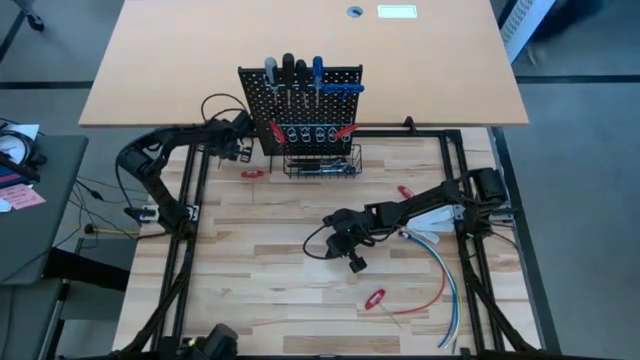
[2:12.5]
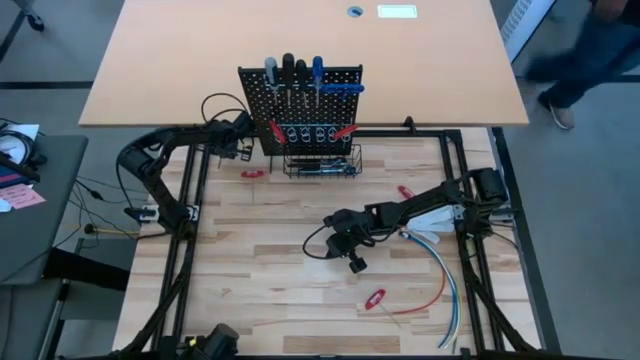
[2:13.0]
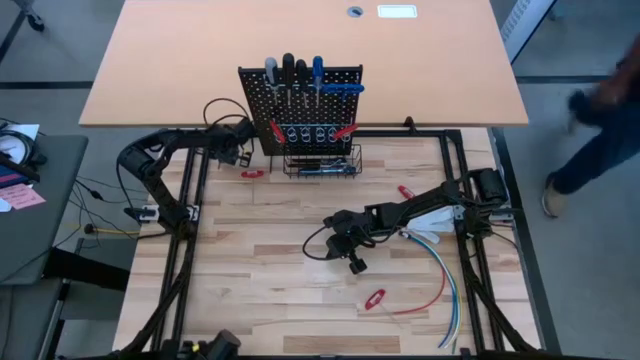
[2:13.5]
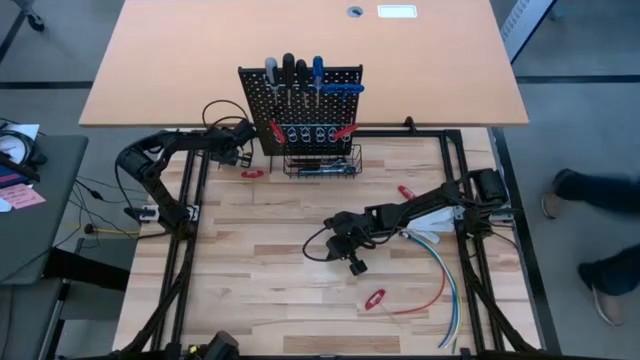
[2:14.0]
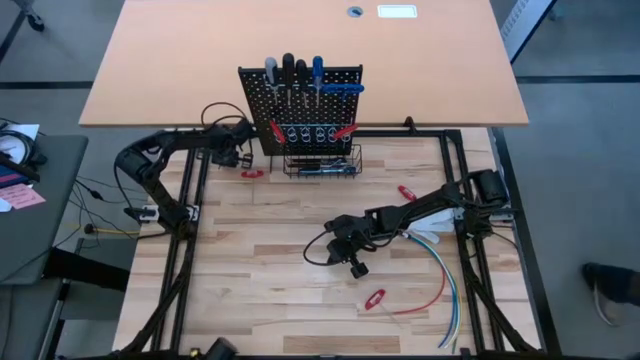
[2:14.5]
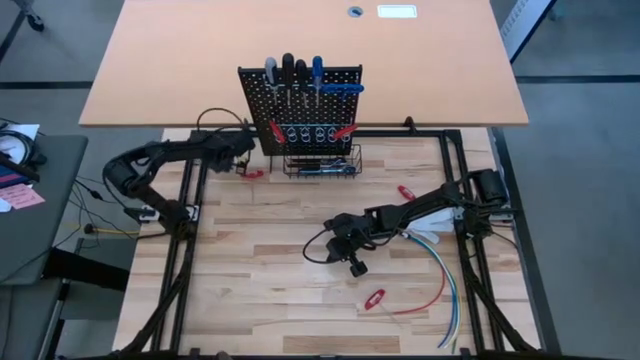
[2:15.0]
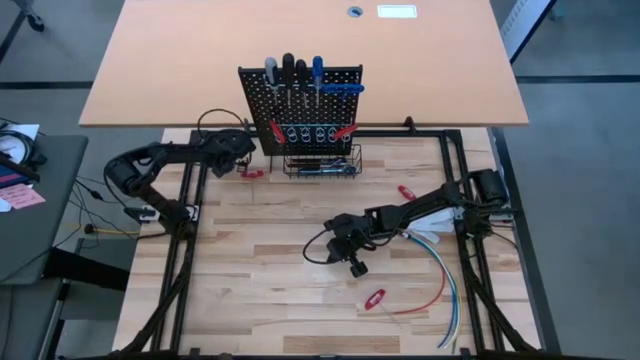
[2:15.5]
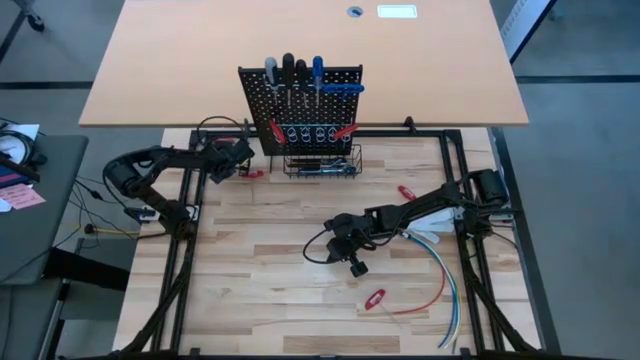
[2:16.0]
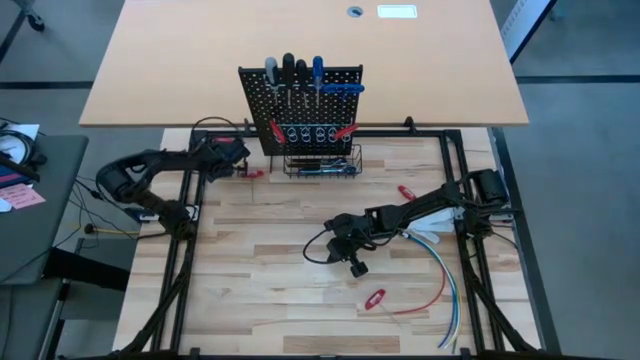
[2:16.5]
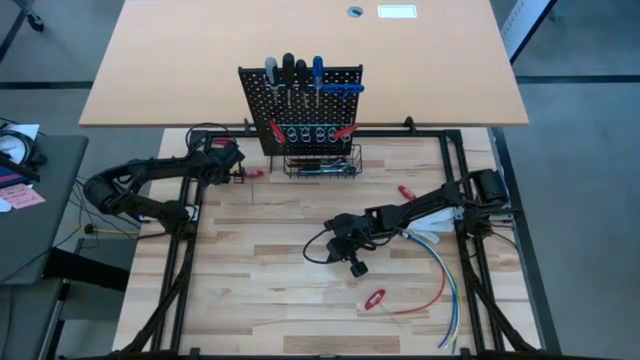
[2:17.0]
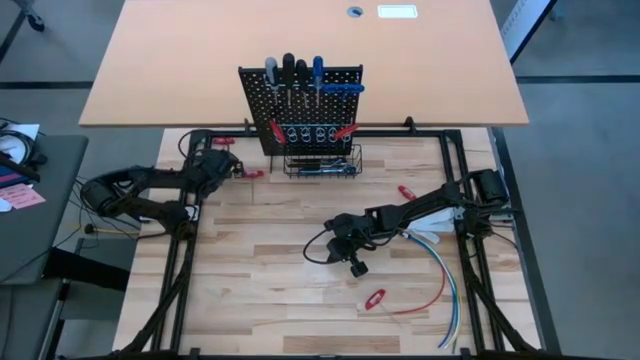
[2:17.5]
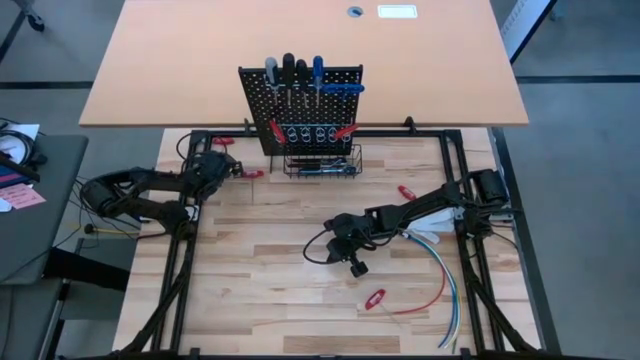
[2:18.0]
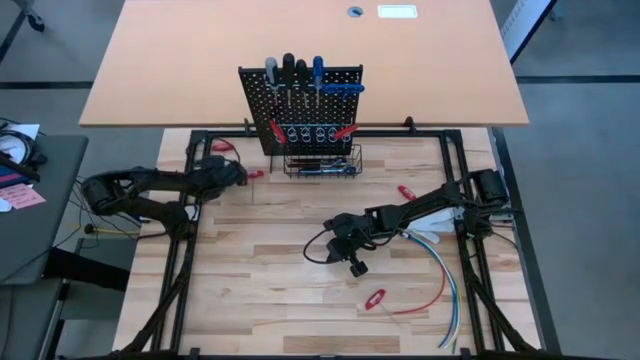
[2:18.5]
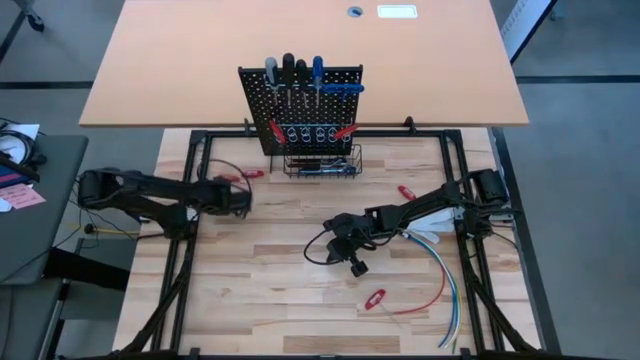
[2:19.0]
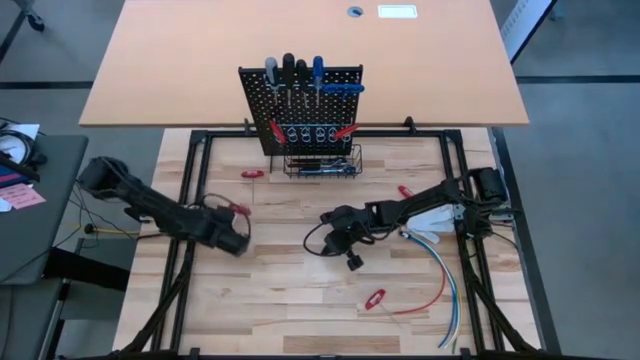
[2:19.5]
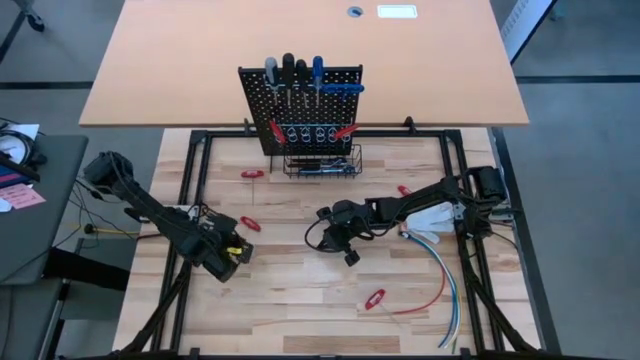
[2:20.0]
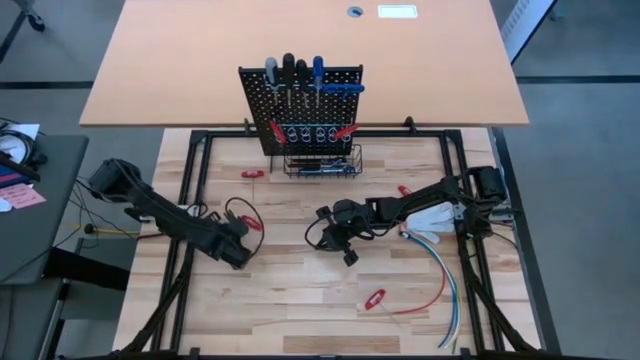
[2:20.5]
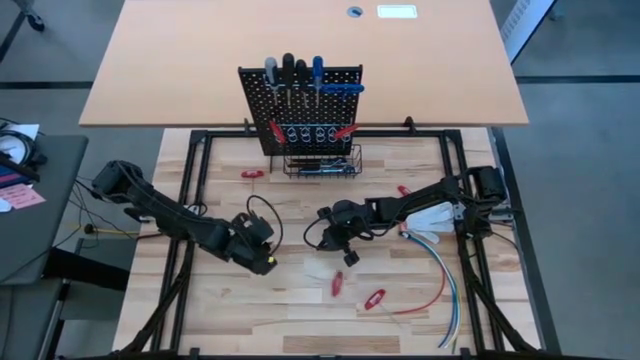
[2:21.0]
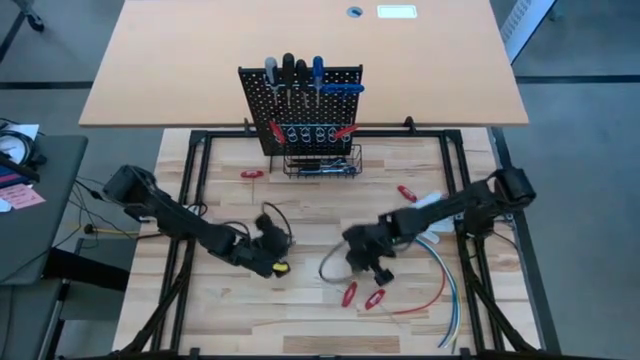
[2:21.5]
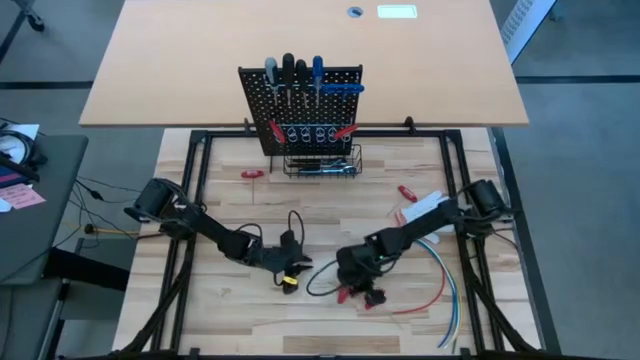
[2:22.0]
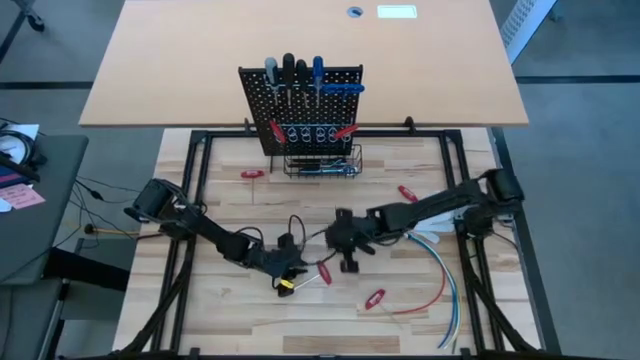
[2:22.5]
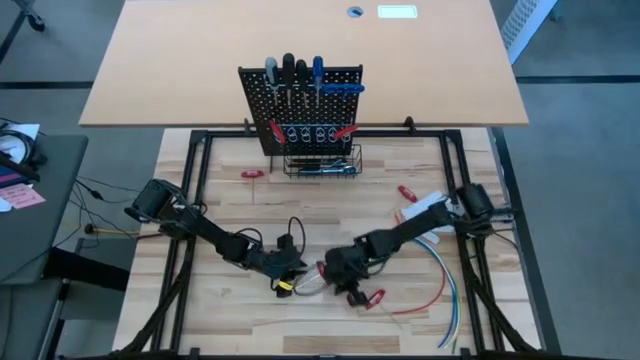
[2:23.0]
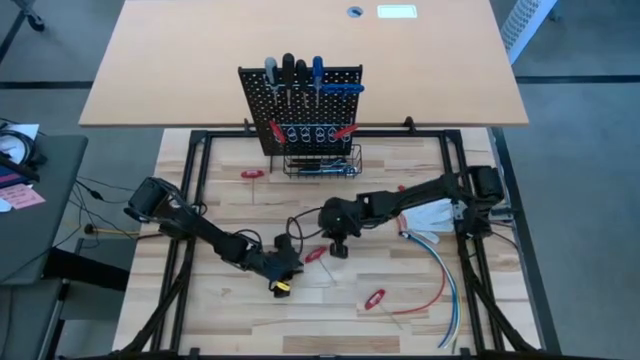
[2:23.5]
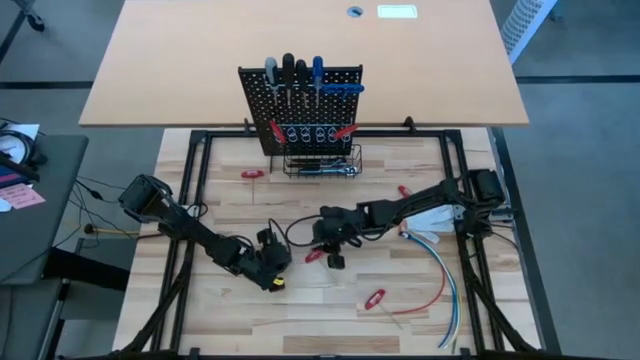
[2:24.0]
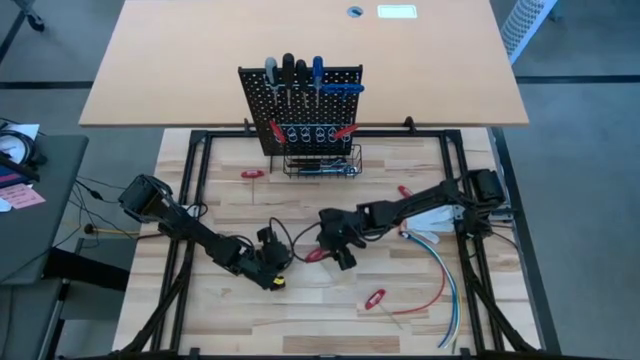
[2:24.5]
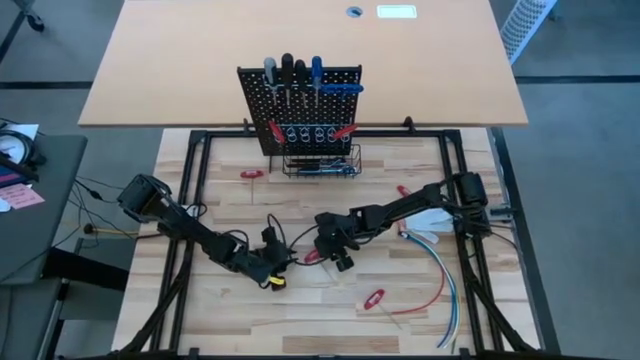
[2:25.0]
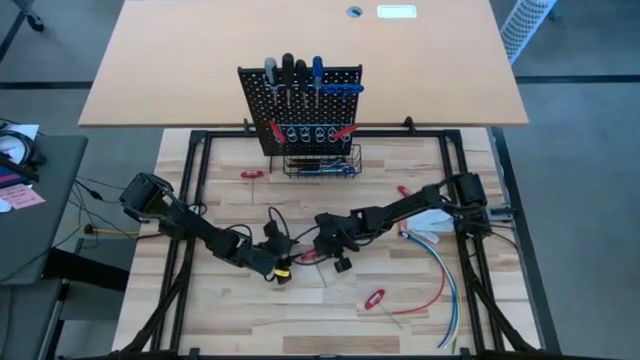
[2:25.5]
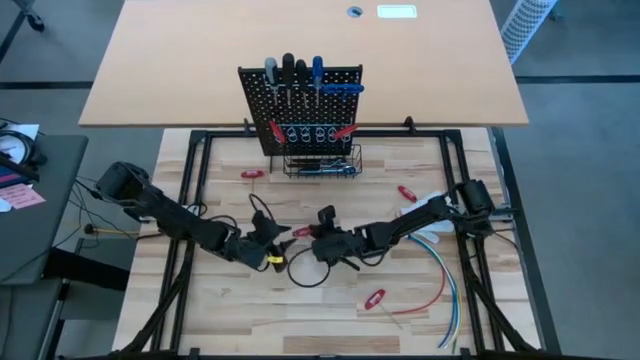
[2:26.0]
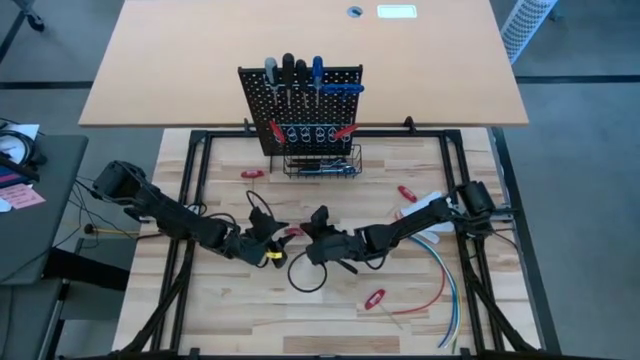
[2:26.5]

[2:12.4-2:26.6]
Task: Hang tools onto peg board
Hang the red allen wrench on the pegboard

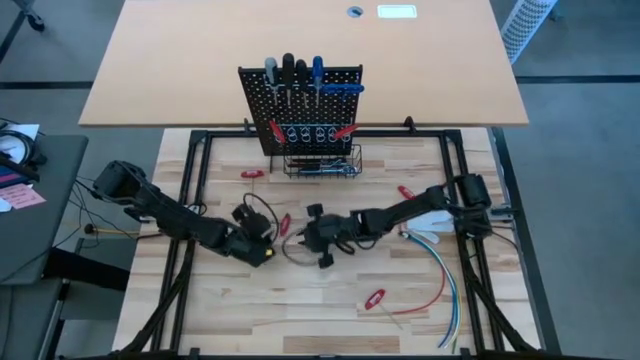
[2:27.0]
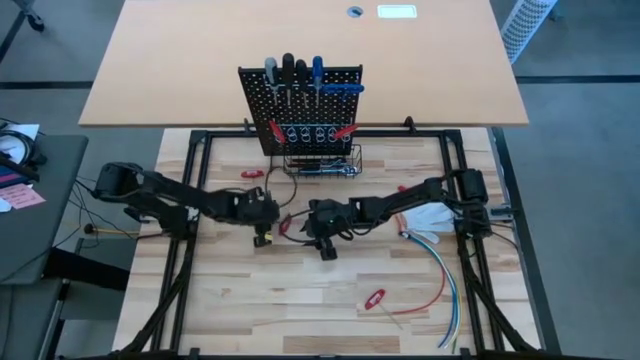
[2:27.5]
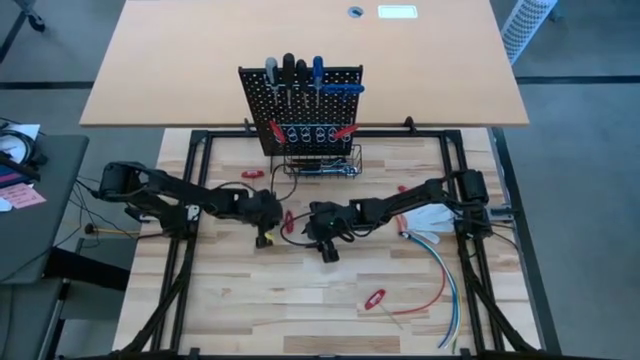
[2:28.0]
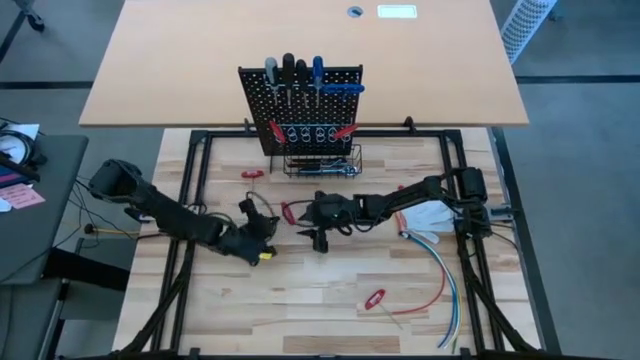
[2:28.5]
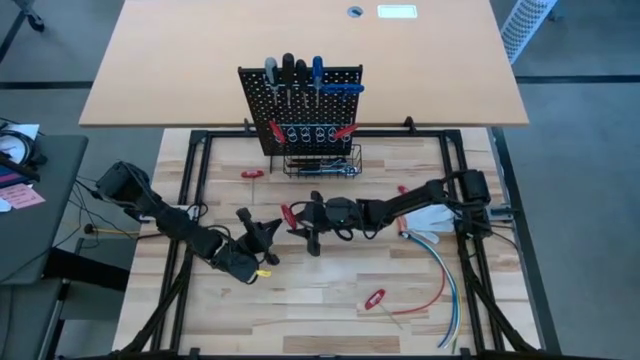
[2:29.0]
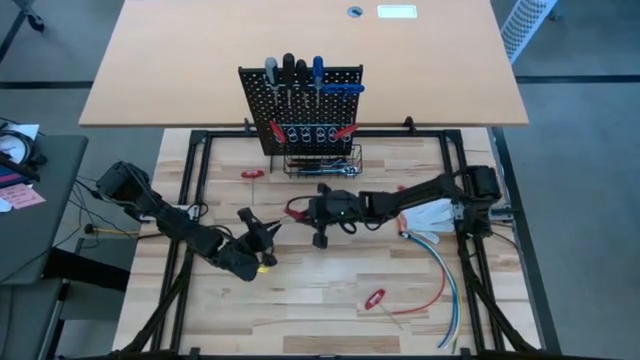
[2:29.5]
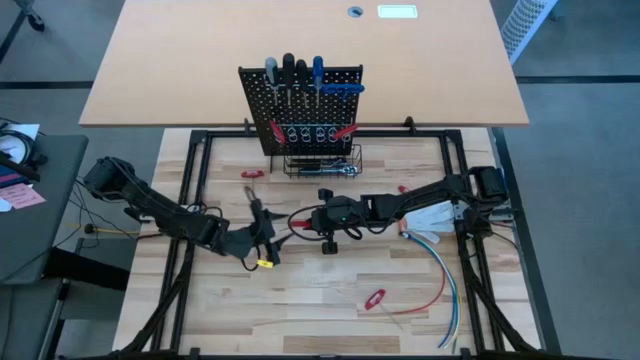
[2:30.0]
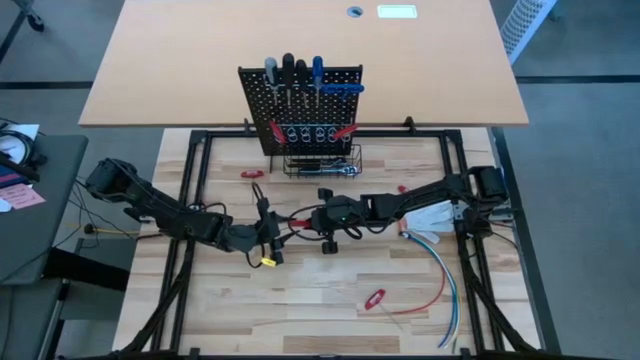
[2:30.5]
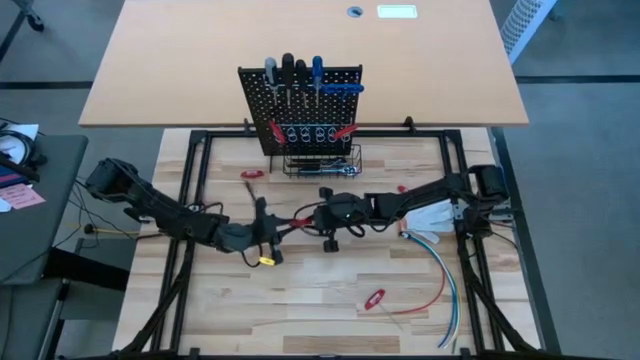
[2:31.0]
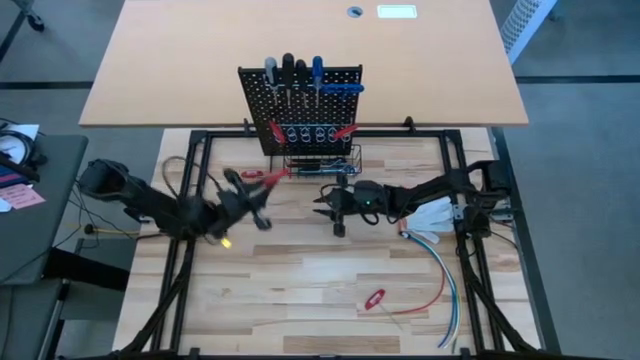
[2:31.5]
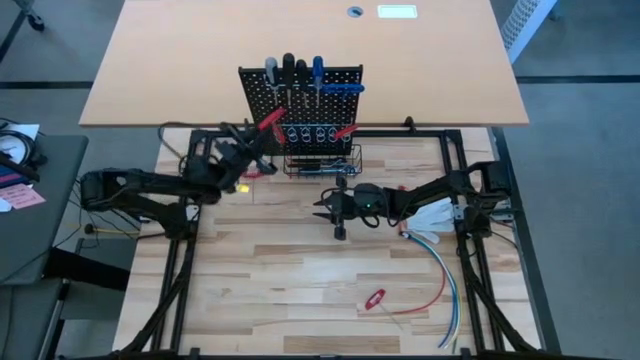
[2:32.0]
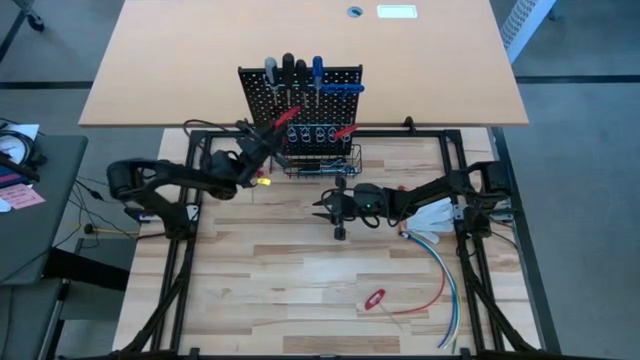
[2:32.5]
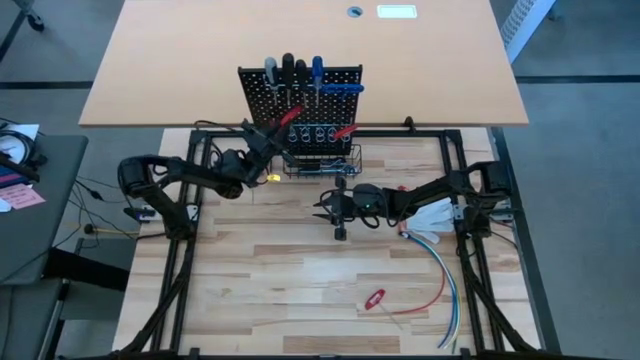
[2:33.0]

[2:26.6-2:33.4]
Hang the red allen wrench on the pegboard

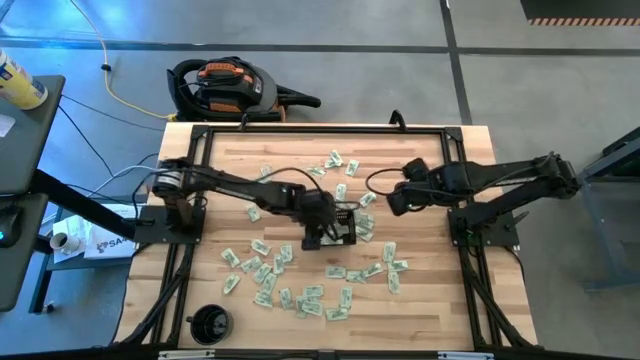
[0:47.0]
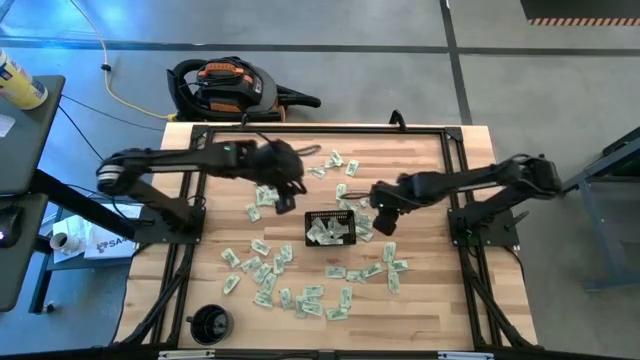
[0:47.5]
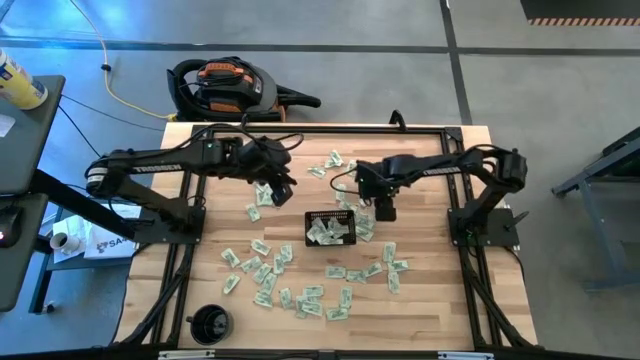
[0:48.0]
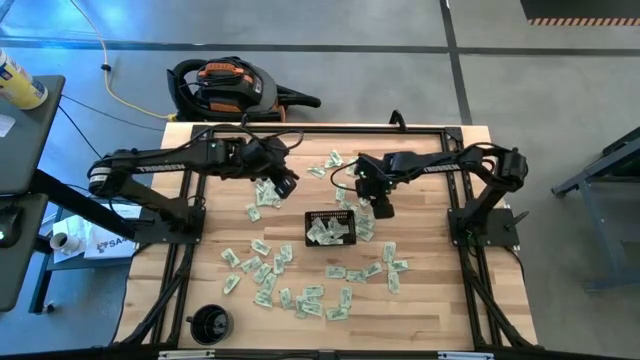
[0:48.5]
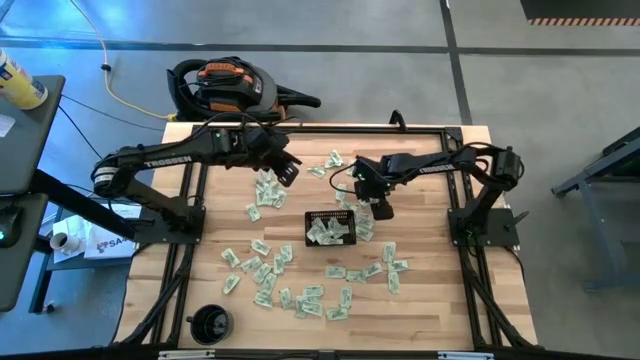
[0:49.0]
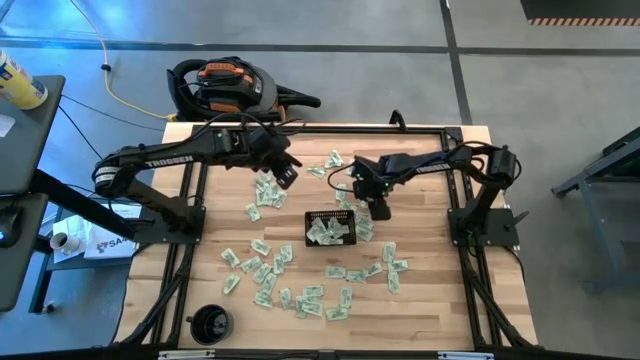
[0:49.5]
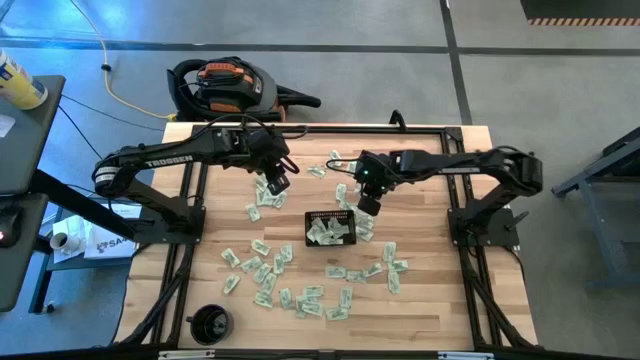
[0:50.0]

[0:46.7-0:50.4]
Task: Pick and place Stevia / Truvia into bins
Put the green stevia packet into the black basket
